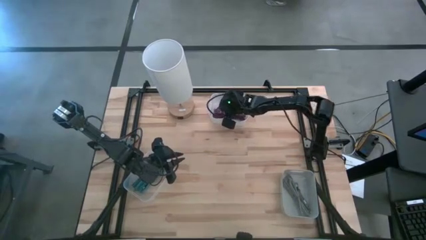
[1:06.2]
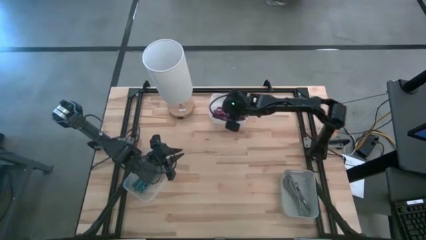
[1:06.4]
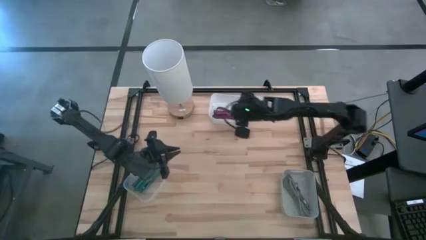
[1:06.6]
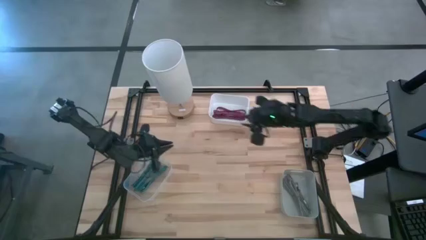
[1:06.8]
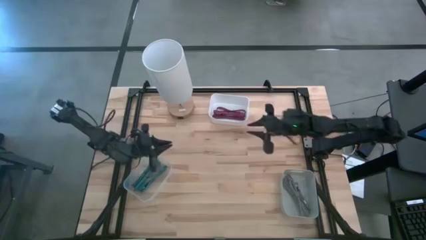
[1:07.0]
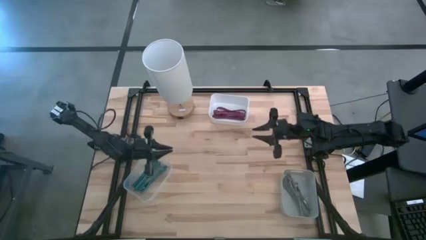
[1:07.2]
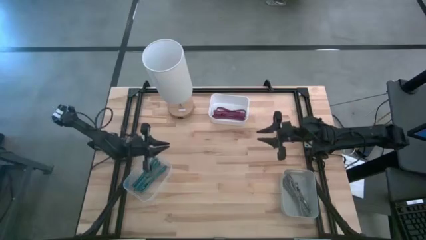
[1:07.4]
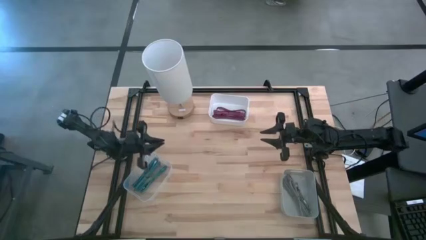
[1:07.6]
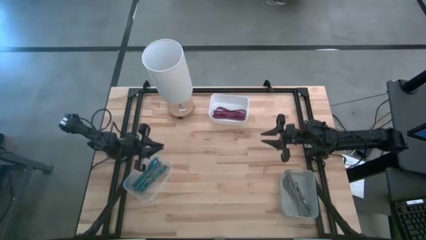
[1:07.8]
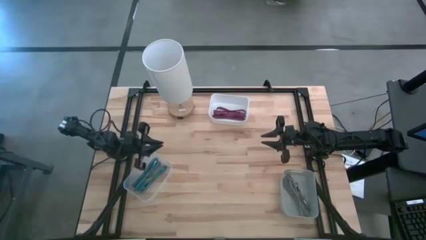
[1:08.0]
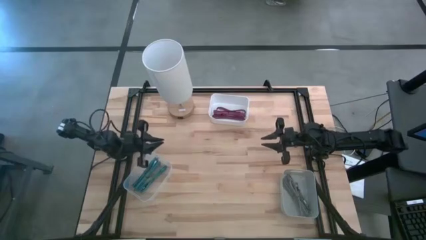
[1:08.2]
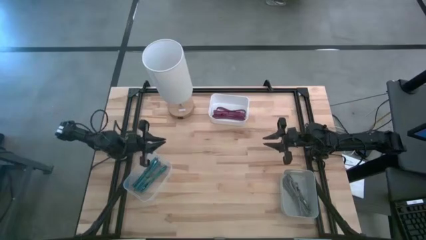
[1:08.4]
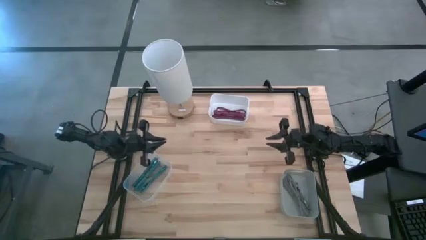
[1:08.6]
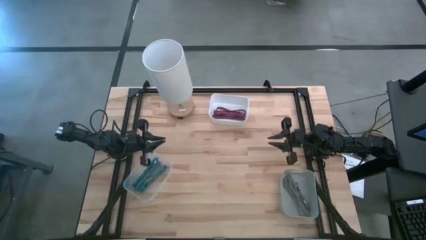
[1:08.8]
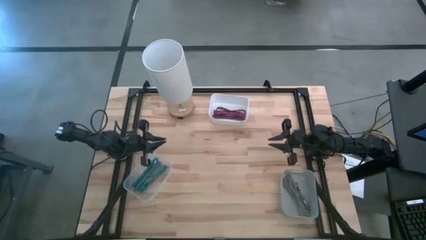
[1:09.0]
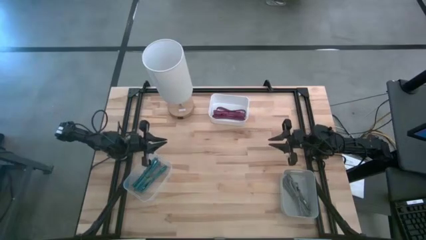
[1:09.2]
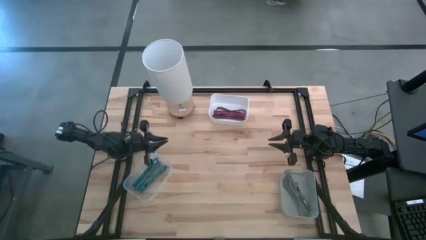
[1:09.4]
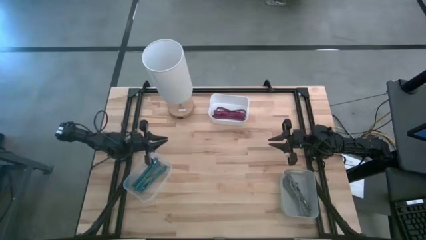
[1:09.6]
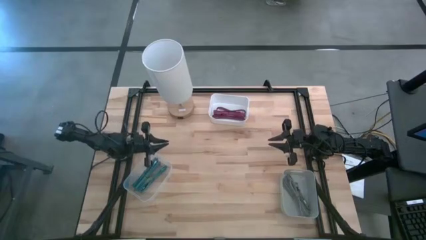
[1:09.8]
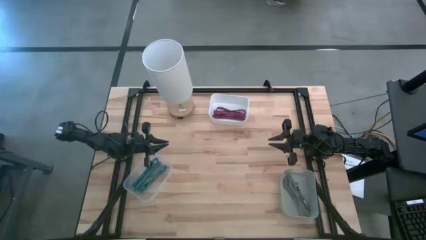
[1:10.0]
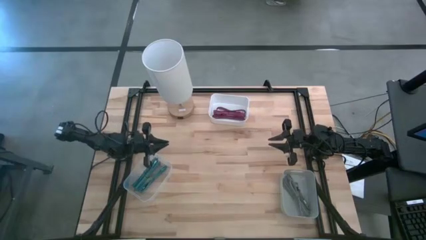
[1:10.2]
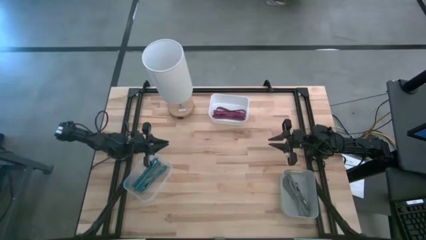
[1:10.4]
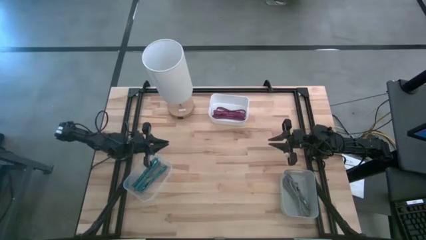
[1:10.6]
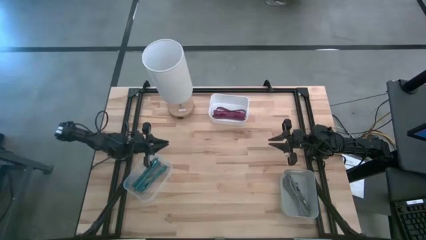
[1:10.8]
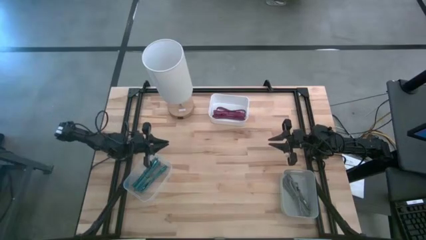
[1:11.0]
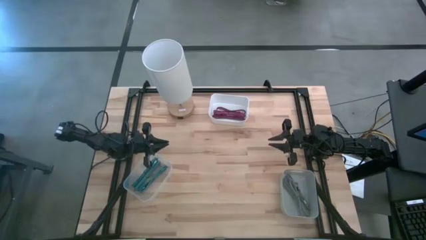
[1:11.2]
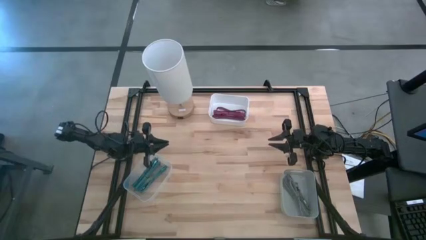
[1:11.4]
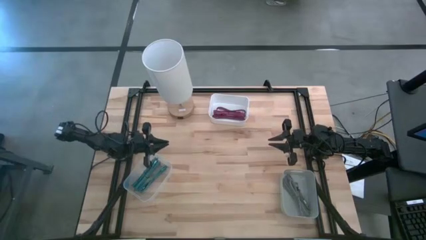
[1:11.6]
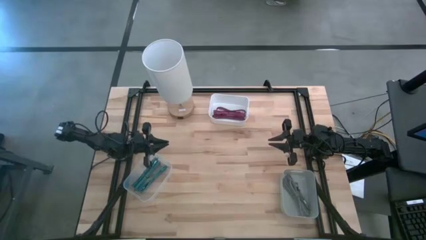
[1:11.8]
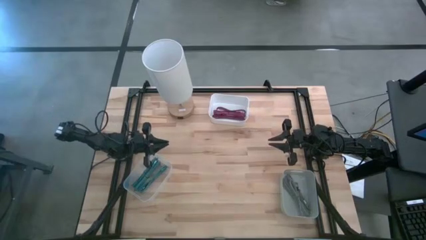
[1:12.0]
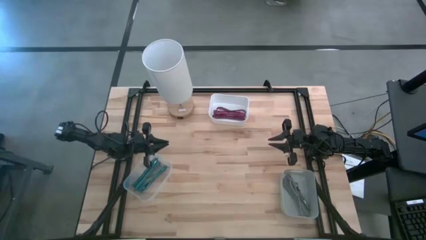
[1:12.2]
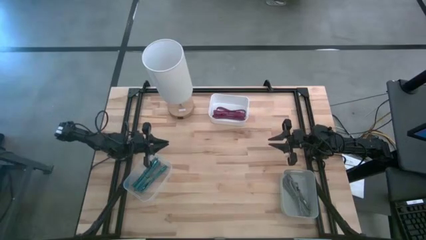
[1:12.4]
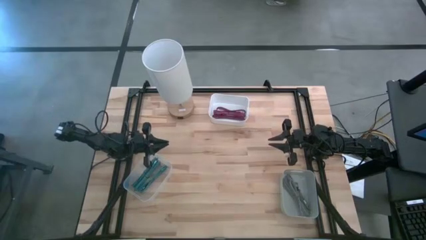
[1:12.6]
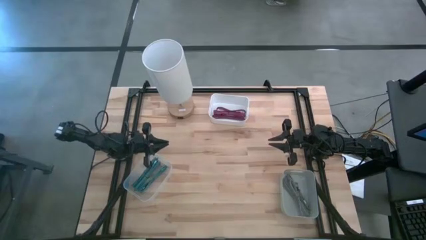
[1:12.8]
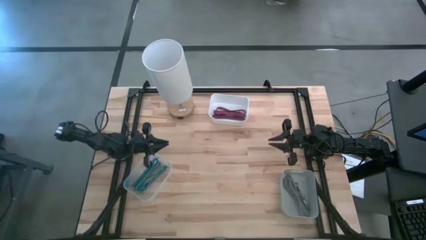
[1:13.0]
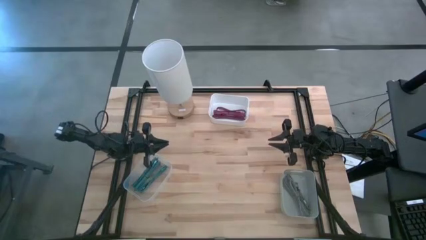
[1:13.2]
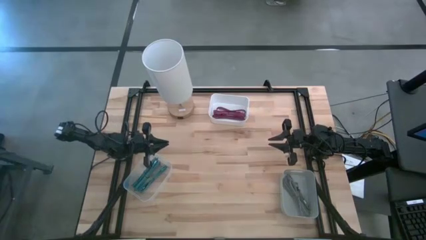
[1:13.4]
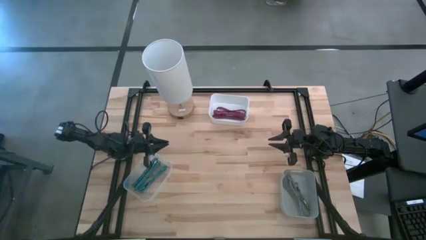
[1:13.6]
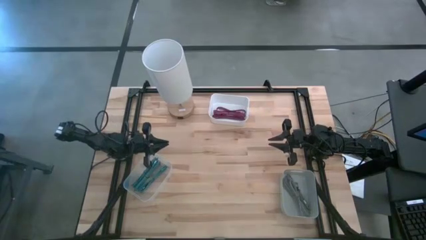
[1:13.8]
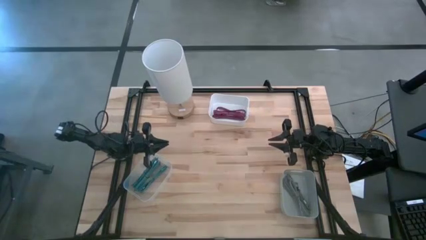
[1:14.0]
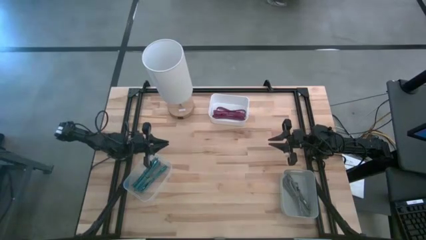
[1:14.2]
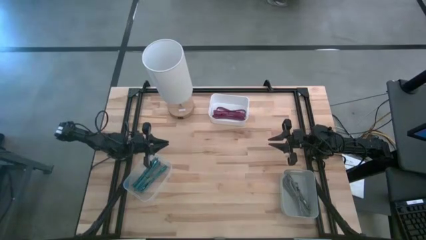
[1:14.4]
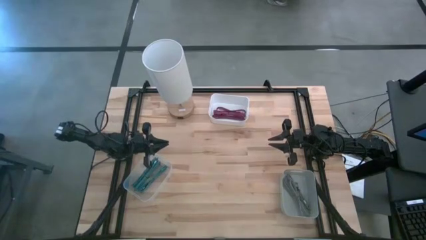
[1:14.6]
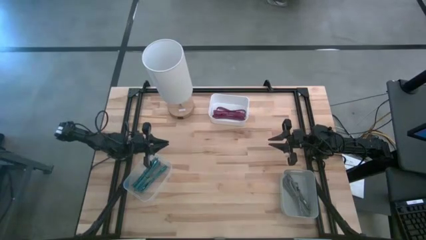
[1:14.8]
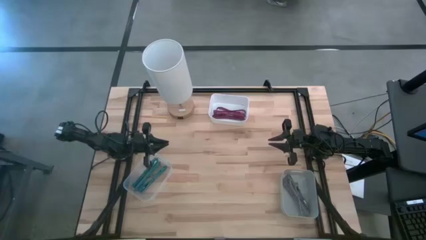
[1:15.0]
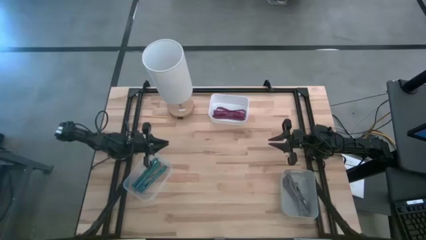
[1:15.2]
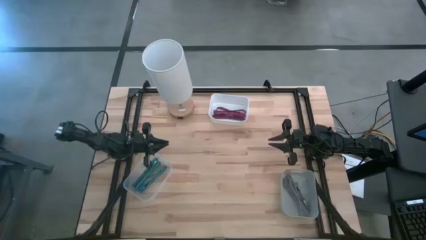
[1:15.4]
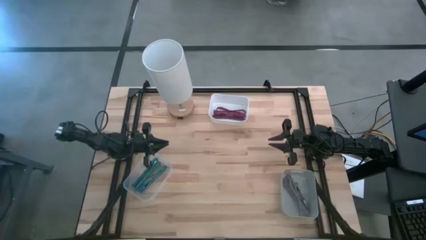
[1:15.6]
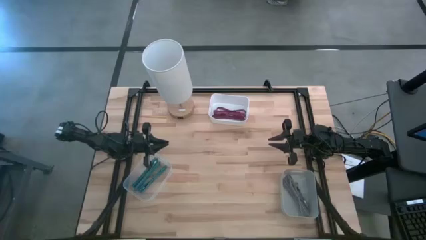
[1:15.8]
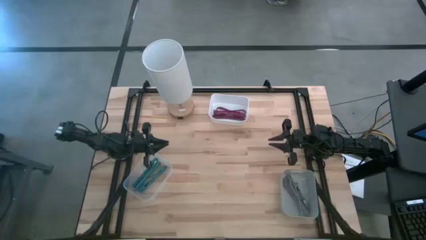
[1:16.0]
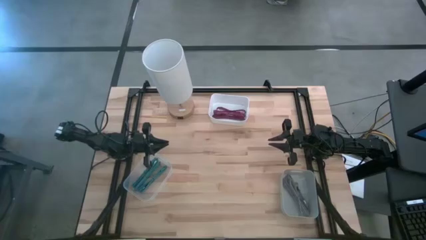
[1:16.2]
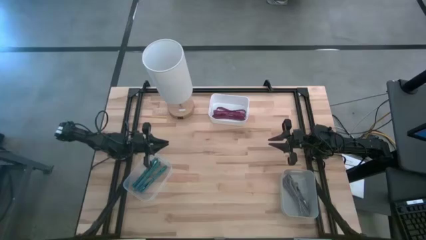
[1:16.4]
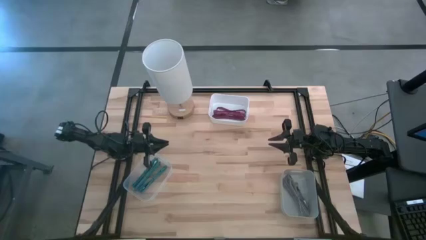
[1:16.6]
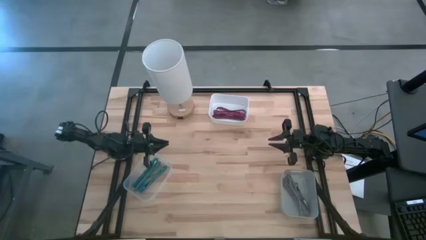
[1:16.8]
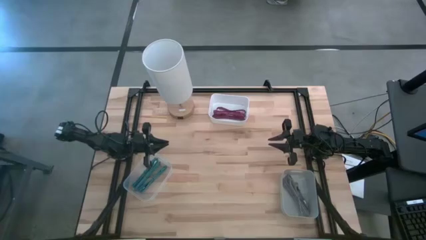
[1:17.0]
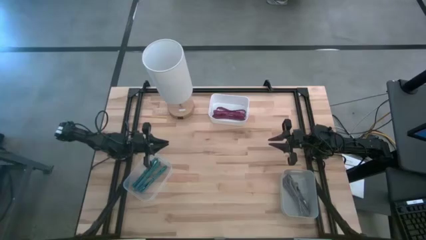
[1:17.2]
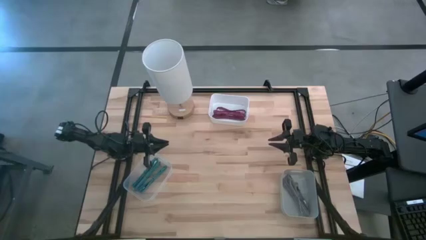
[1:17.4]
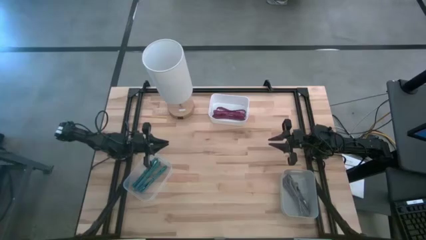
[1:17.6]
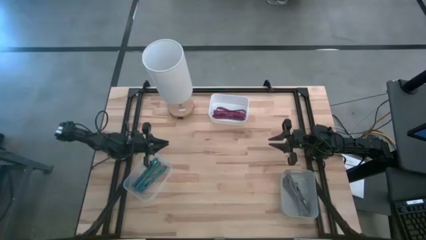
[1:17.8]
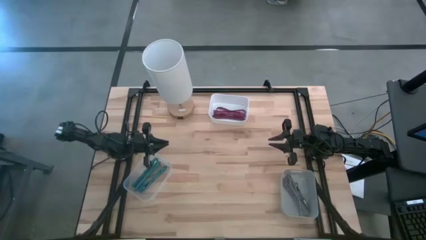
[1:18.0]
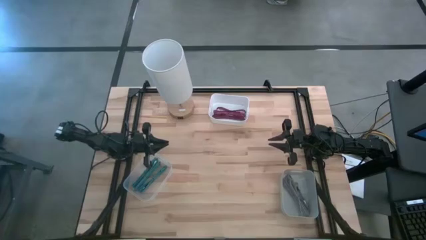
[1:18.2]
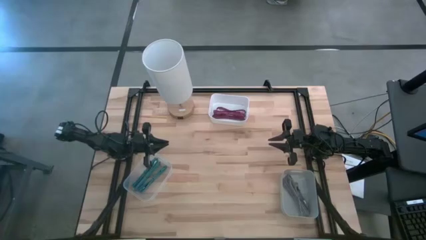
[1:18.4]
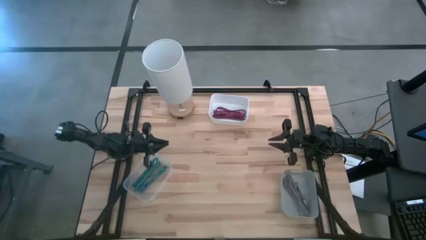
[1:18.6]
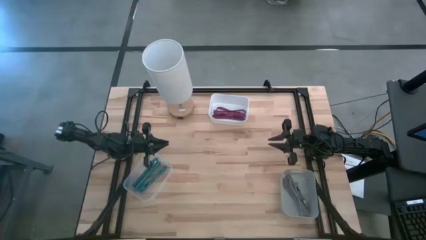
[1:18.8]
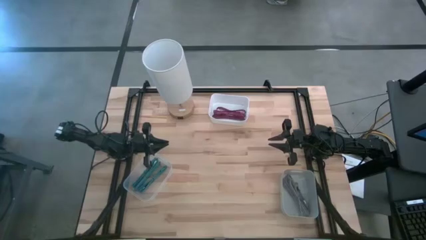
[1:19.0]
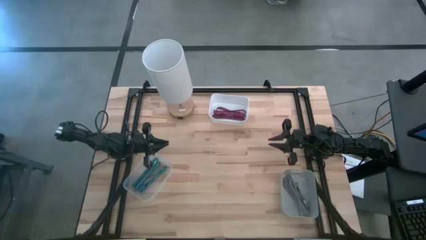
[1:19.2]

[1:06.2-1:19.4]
Task: Pick & Place USB Port
Return to Home Position
